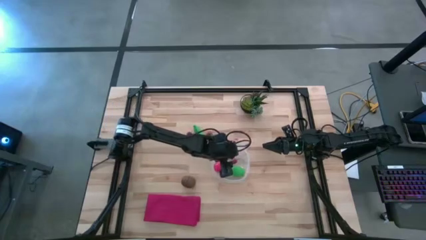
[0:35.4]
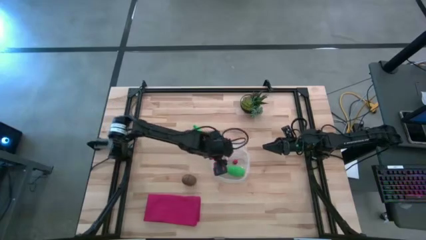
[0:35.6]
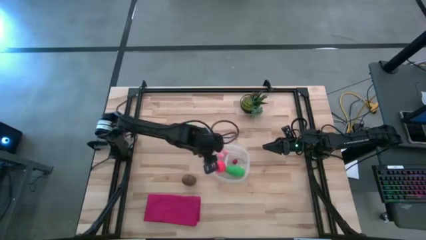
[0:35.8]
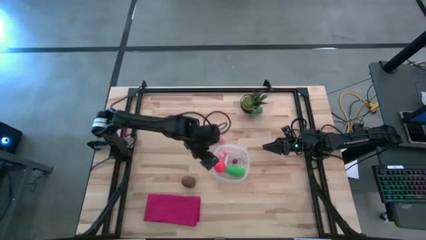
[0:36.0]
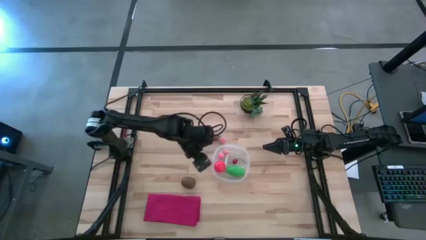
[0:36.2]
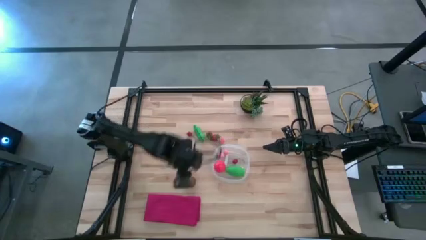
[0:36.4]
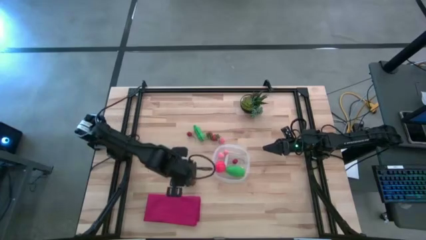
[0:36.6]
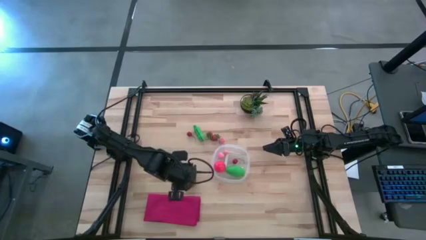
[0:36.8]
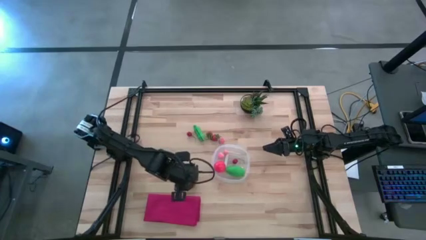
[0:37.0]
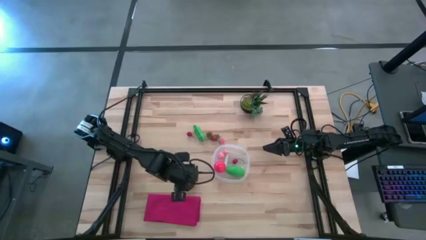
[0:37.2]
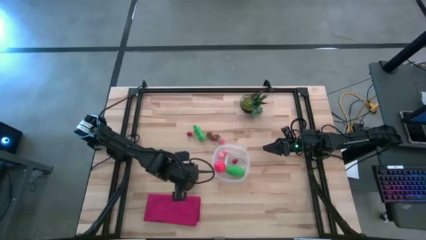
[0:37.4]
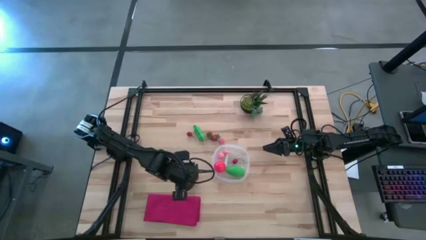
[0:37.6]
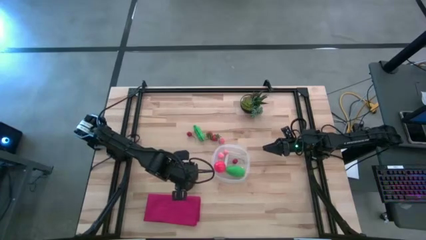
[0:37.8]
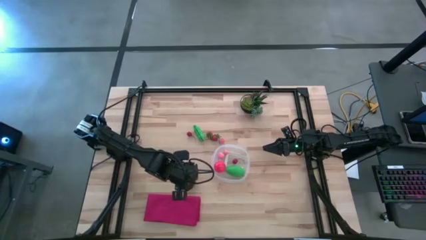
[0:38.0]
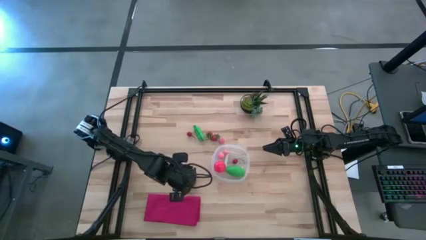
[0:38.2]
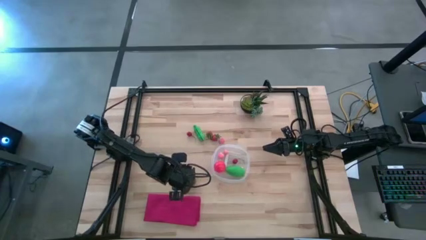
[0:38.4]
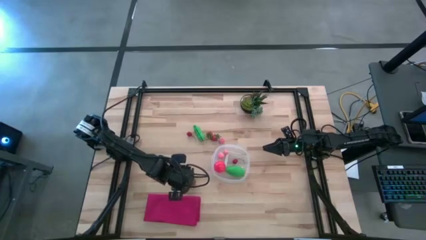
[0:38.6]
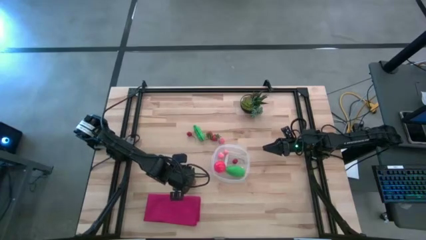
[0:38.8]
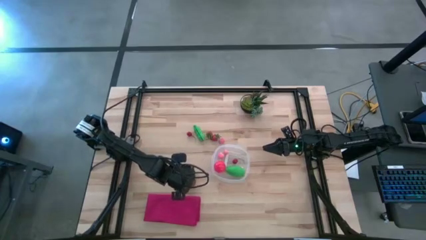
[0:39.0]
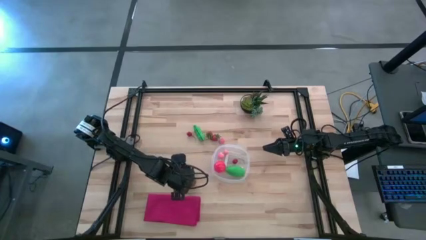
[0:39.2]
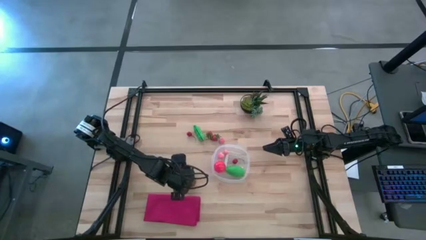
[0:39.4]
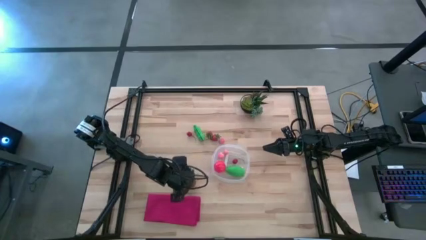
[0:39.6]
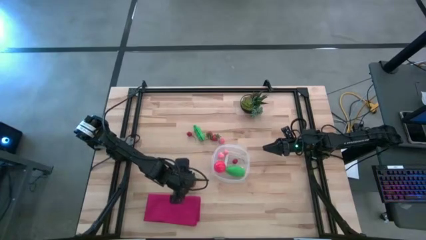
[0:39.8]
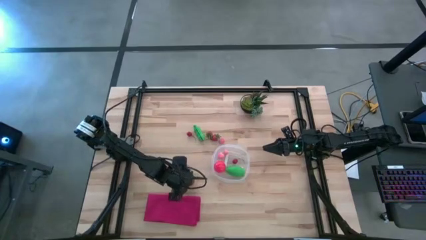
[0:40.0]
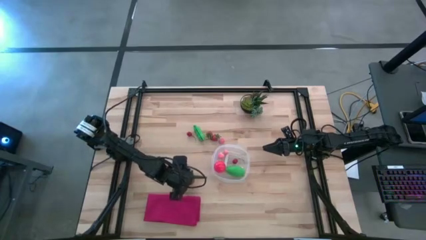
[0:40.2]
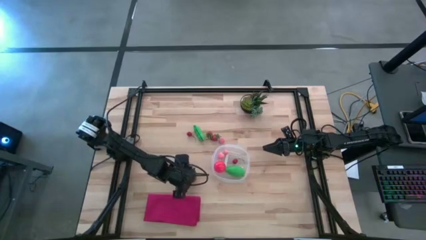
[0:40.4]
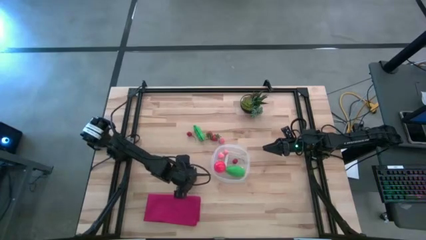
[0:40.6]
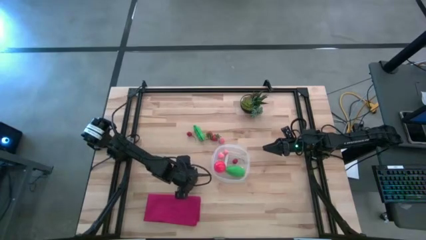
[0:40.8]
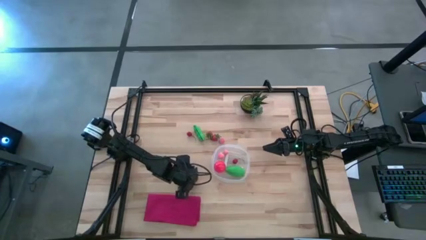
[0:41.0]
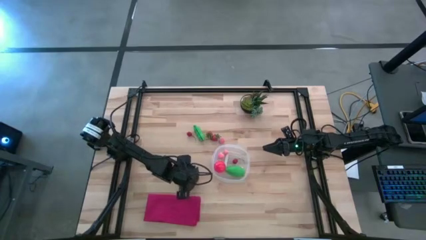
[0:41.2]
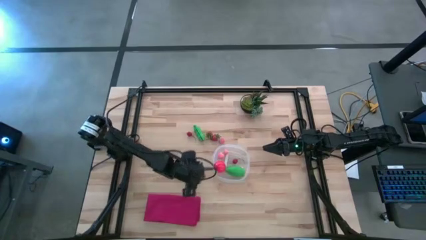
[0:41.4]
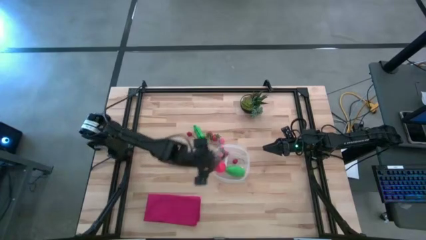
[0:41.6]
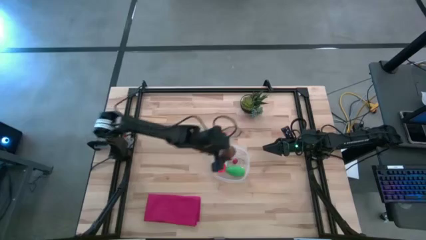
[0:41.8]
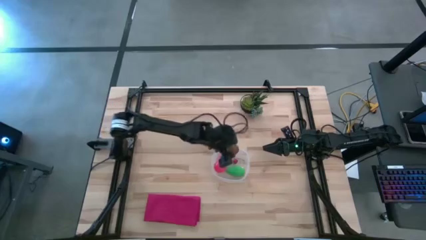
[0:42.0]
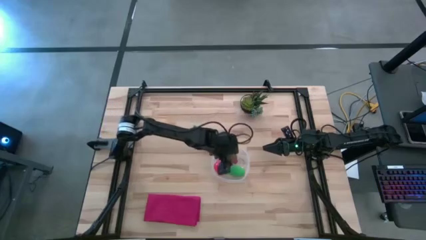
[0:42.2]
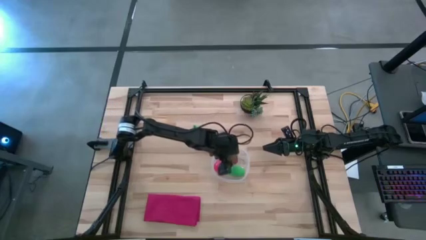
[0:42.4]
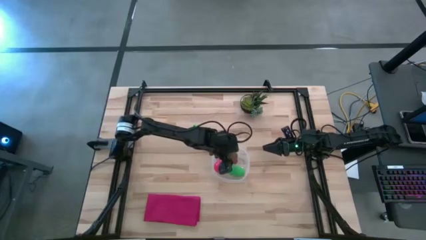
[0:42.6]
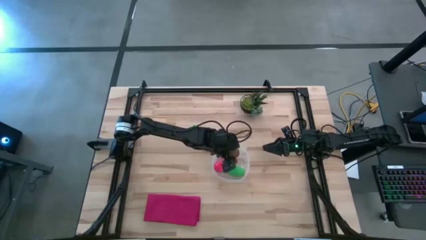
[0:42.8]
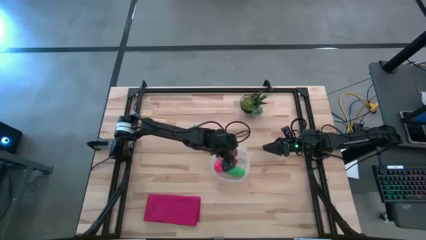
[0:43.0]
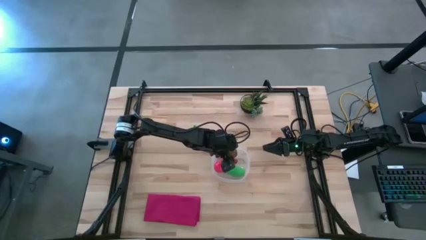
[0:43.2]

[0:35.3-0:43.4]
Task: Pick and placing Produce into tupperware
Put the kiwi into the transparent container

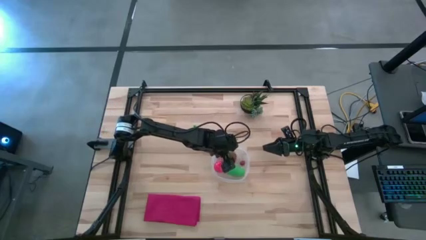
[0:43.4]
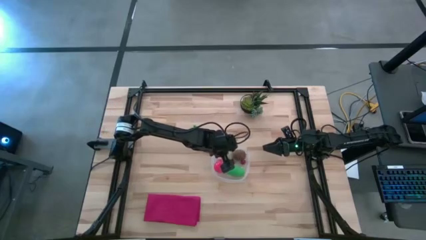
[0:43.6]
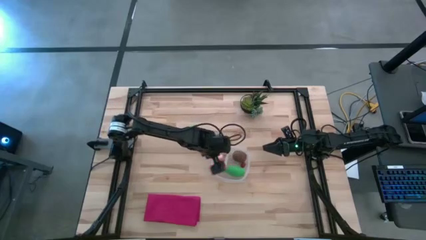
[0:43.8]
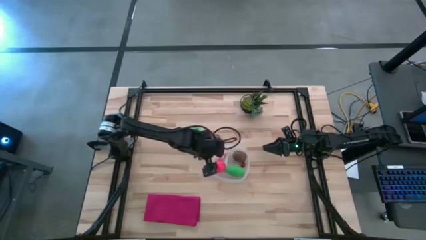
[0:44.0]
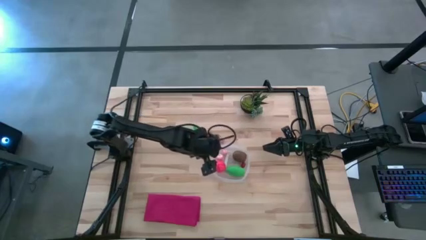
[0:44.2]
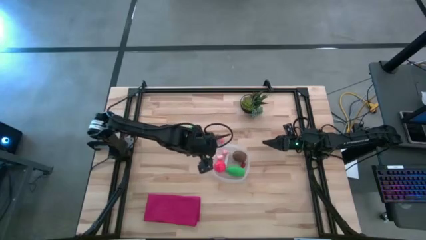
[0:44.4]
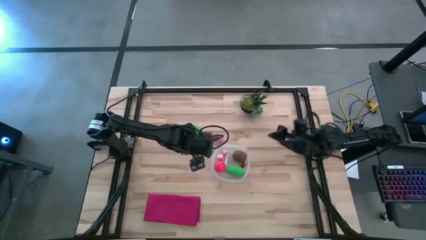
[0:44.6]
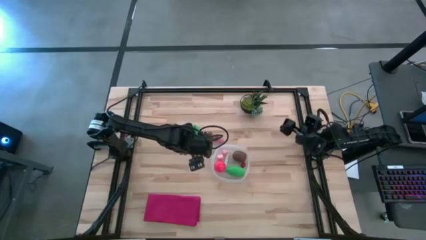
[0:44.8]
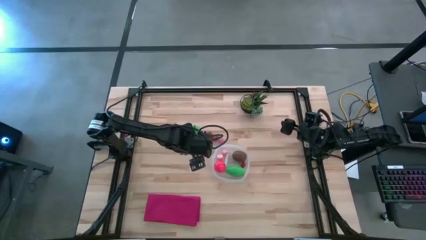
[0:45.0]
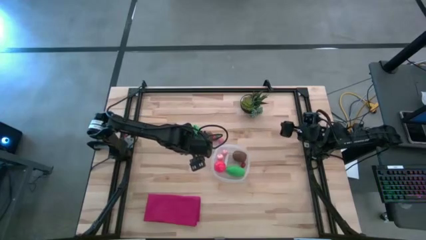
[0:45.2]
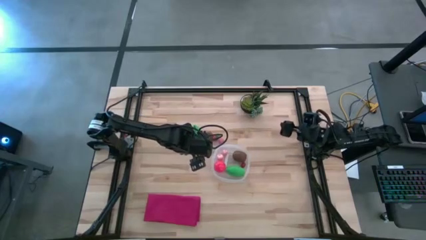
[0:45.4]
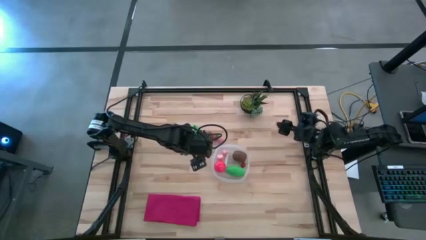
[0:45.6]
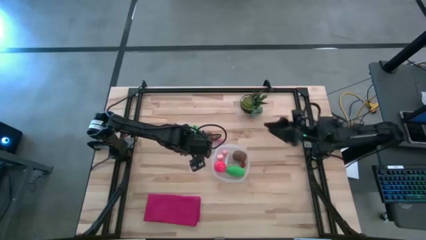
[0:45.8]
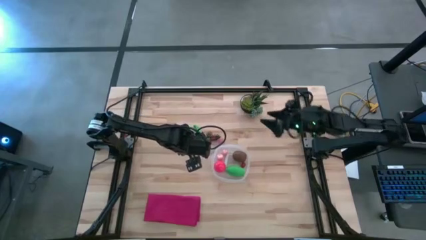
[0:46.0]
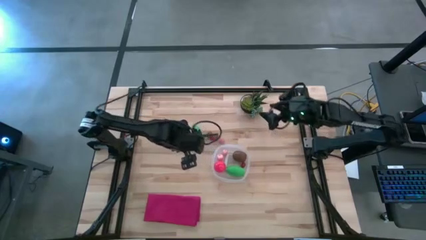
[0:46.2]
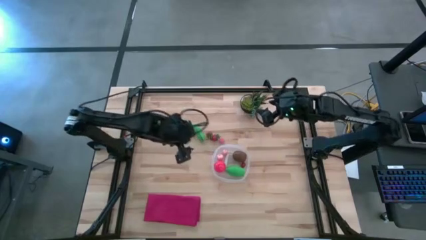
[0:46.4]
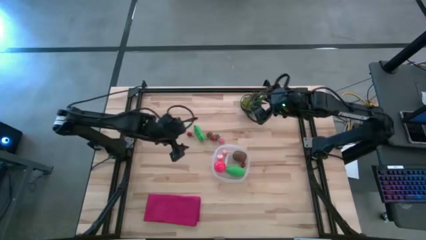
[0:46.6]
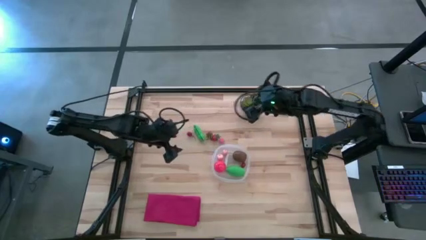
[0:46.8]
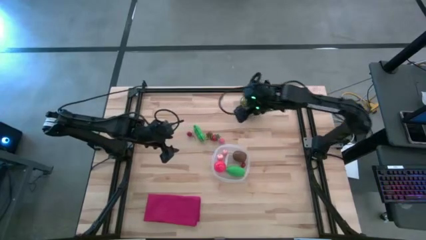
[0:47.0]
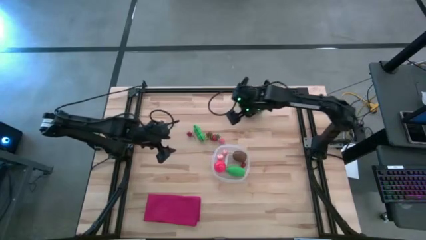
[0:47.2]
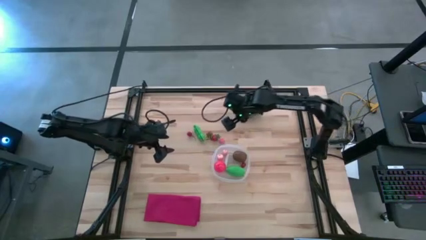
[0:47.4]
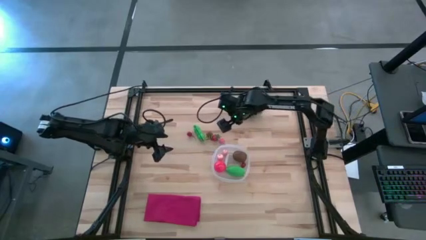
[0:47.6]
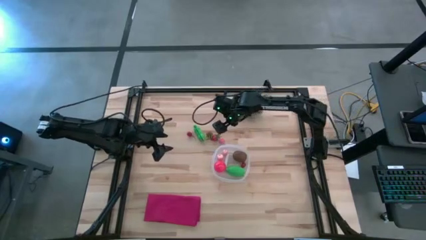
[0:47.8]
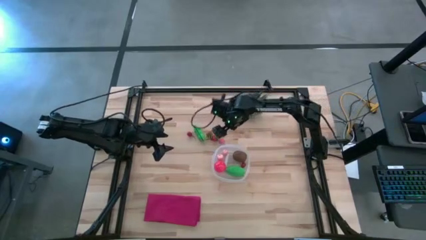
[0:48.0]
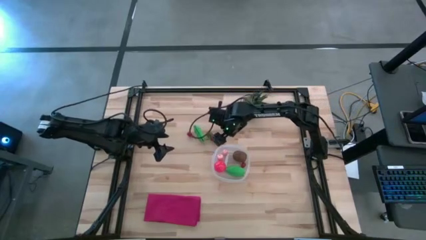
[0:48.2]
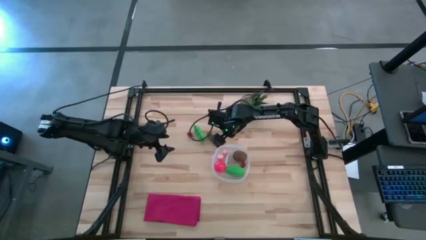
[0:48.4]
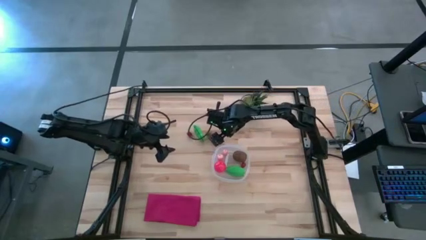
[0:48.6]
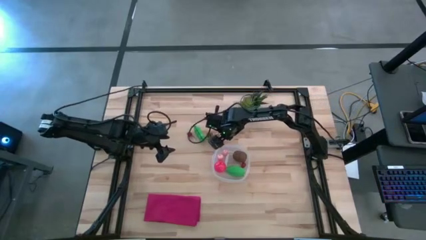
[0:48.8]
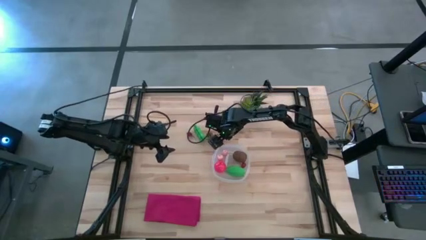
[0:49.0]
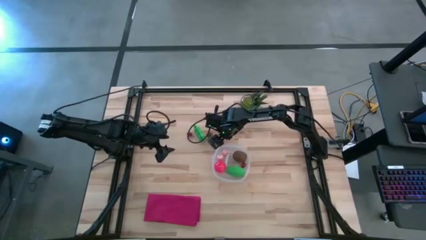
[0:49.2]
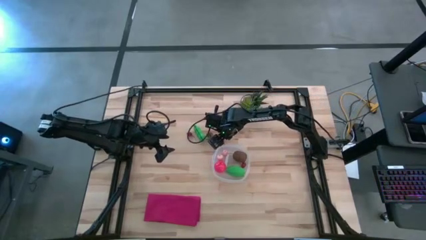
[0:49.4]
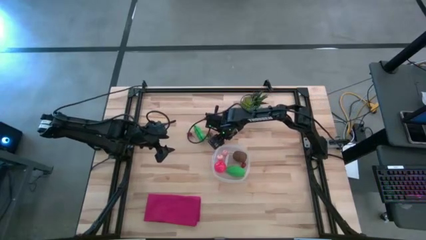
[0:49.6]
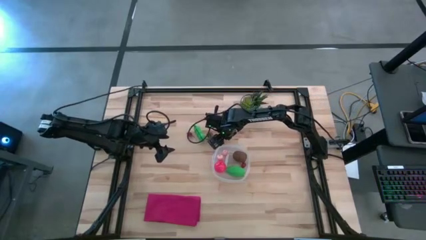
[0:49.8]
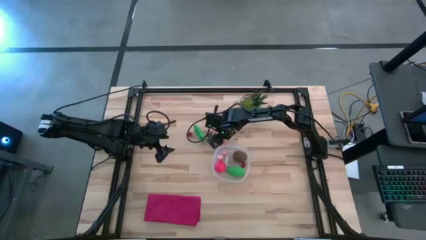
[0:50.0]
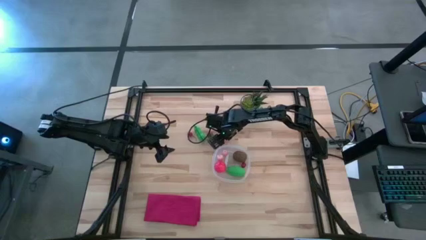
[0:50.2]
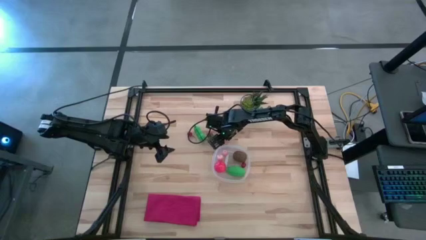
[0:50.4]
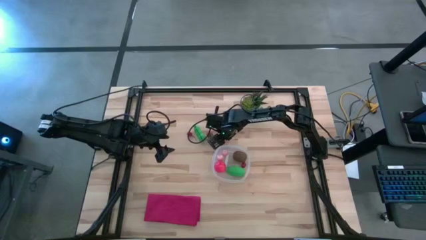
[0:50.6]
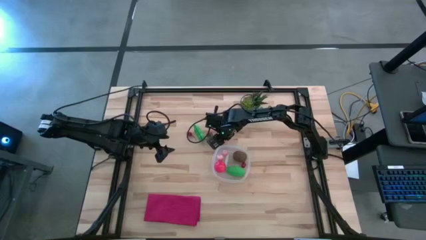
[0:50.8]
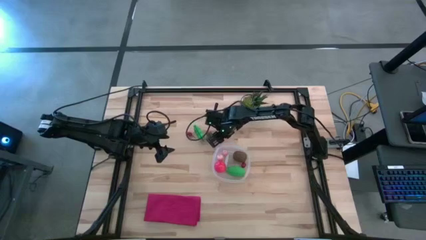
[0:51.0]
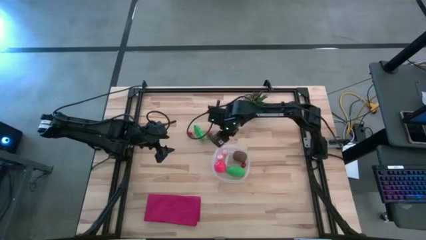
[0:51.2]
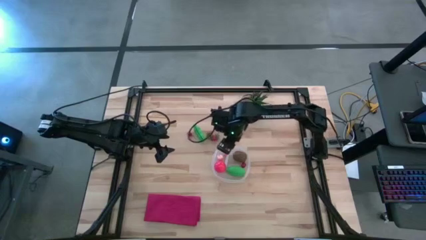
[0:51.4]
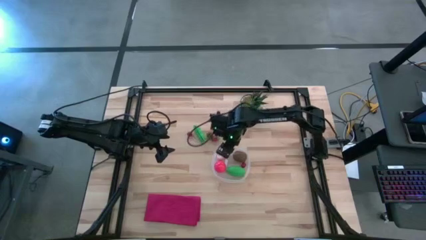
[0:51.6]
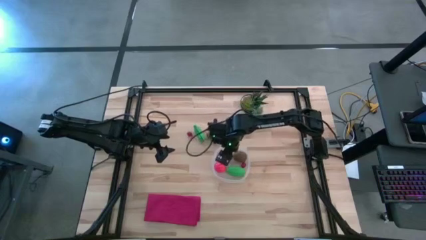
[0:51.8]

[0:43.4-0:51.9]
Put the peach into the transparent container
